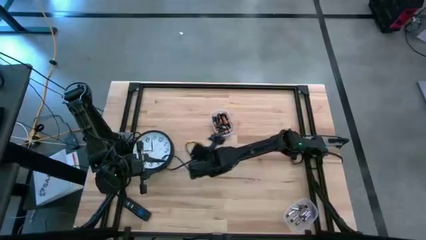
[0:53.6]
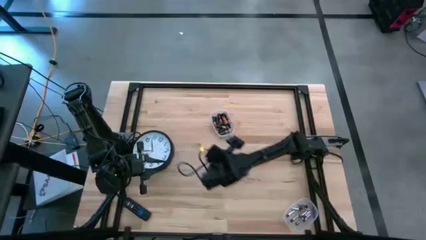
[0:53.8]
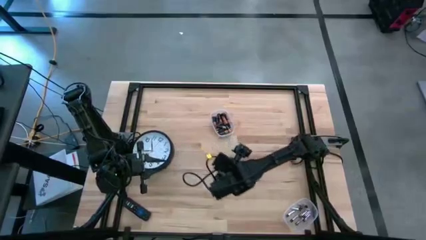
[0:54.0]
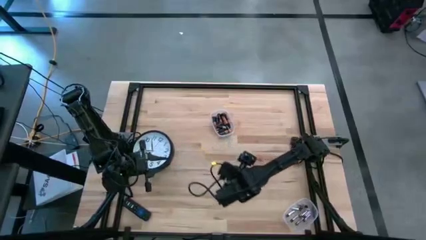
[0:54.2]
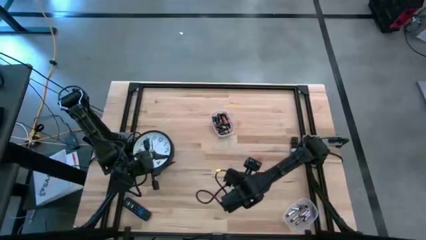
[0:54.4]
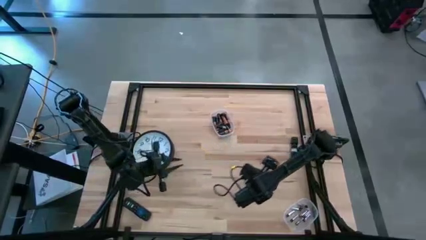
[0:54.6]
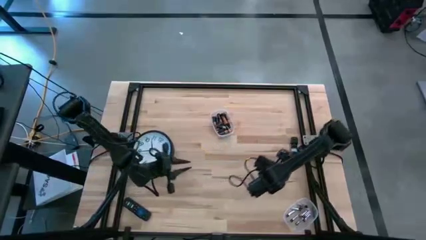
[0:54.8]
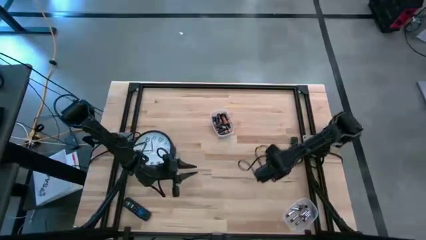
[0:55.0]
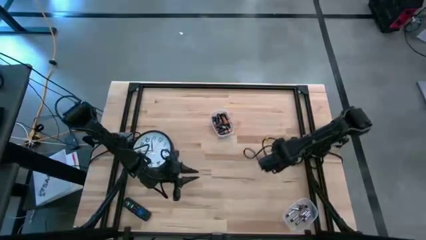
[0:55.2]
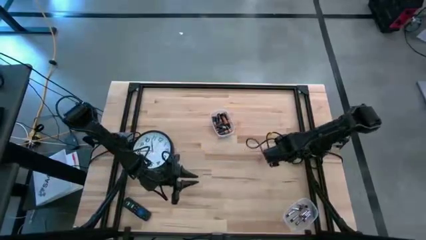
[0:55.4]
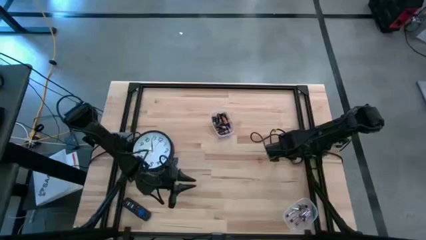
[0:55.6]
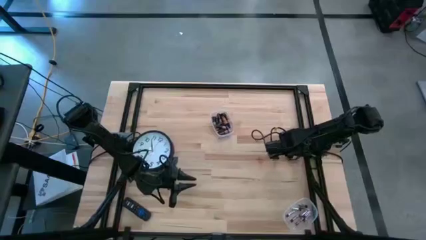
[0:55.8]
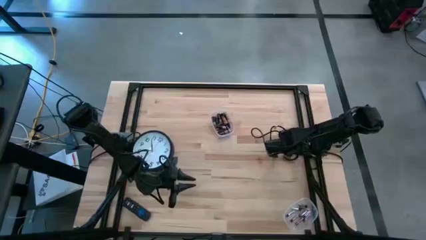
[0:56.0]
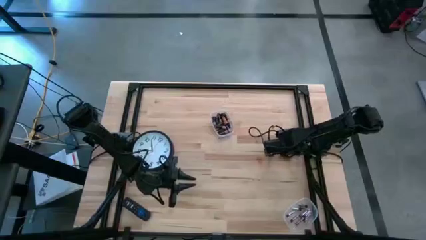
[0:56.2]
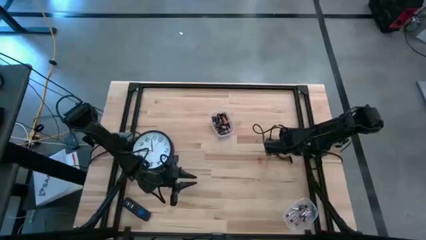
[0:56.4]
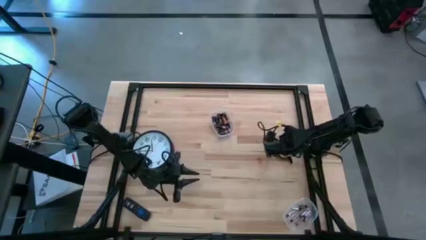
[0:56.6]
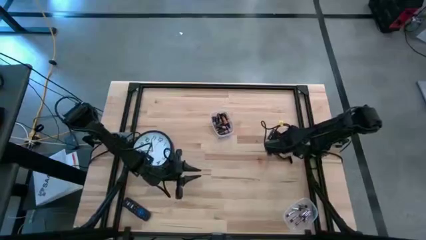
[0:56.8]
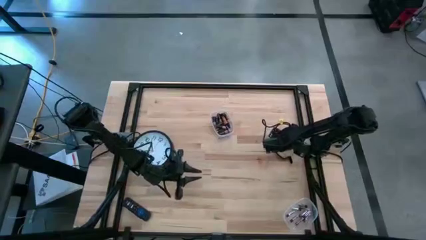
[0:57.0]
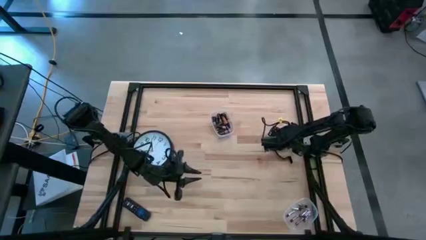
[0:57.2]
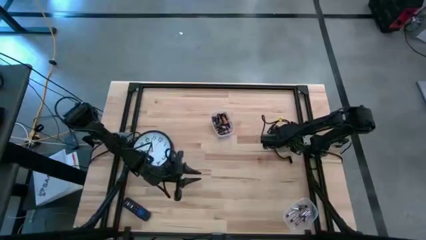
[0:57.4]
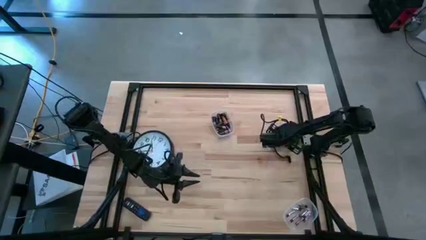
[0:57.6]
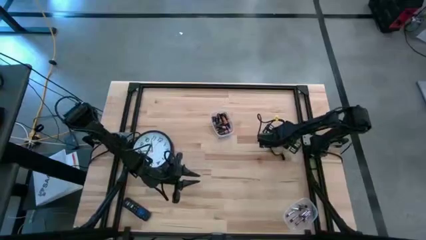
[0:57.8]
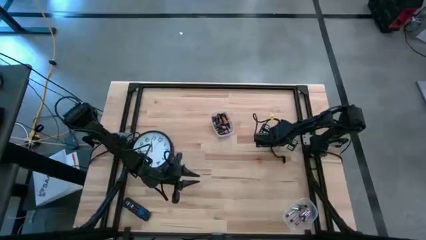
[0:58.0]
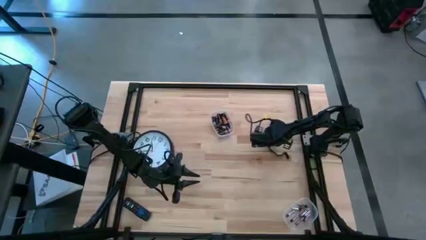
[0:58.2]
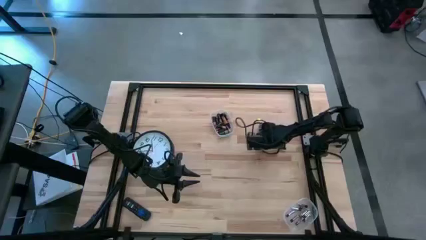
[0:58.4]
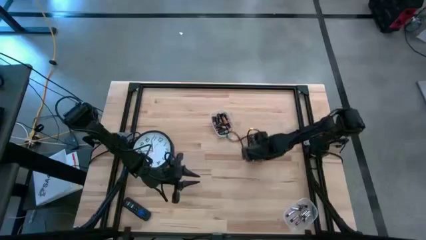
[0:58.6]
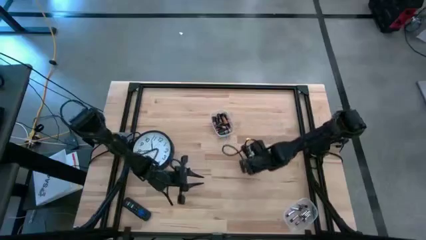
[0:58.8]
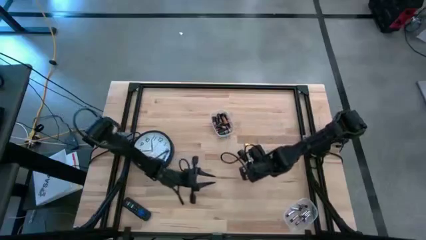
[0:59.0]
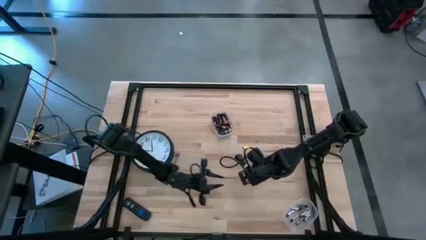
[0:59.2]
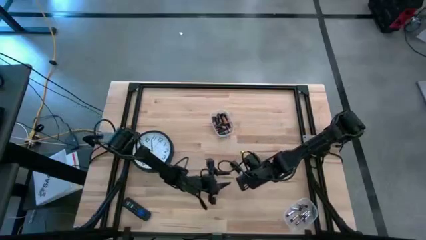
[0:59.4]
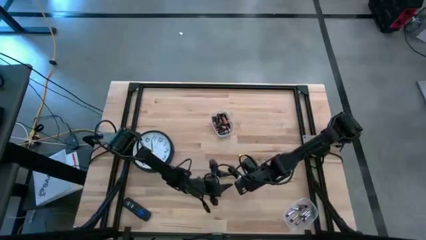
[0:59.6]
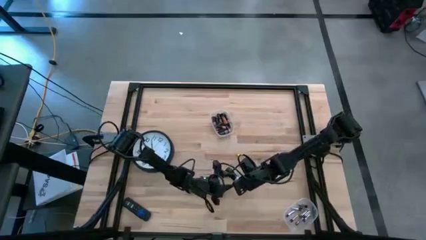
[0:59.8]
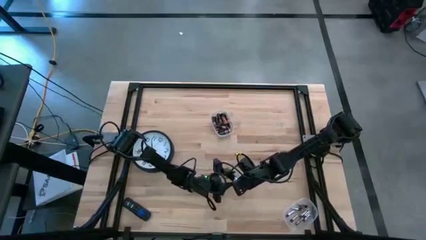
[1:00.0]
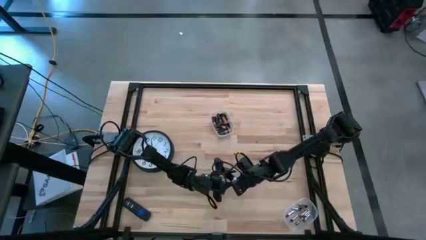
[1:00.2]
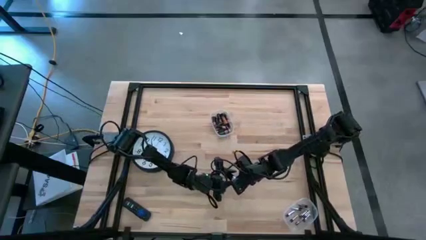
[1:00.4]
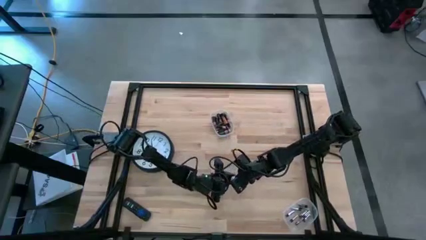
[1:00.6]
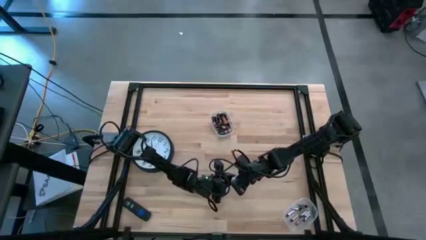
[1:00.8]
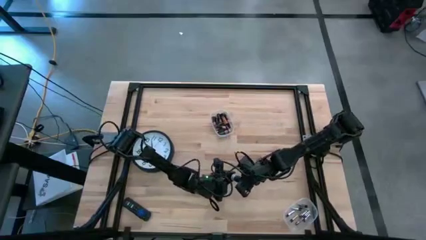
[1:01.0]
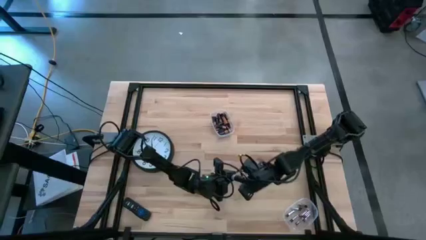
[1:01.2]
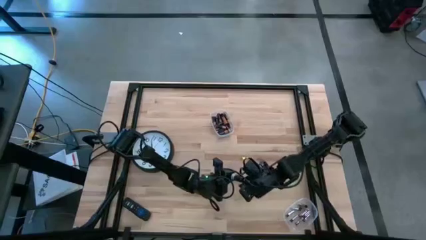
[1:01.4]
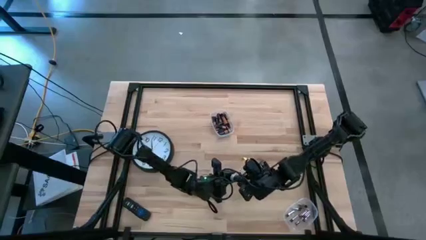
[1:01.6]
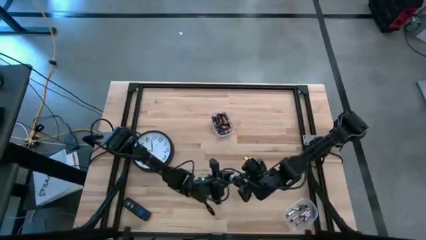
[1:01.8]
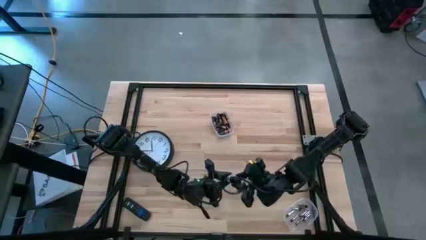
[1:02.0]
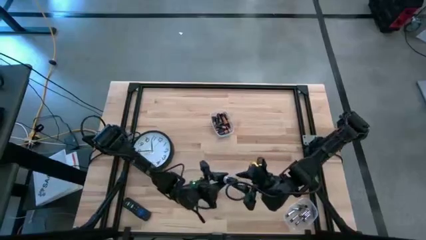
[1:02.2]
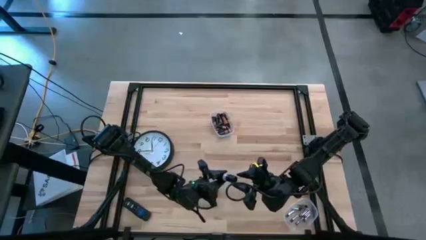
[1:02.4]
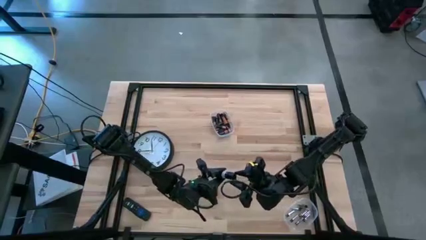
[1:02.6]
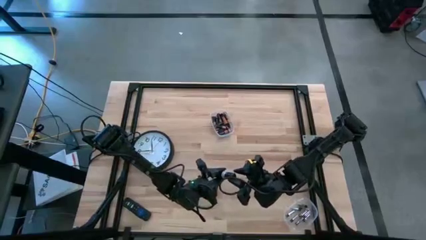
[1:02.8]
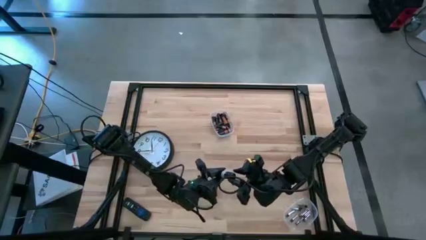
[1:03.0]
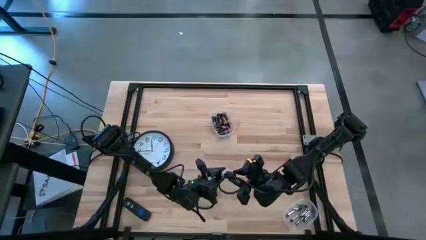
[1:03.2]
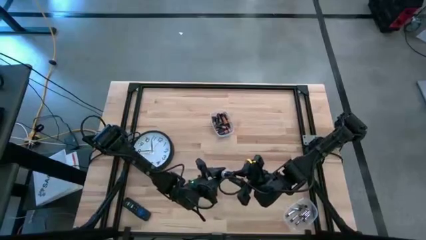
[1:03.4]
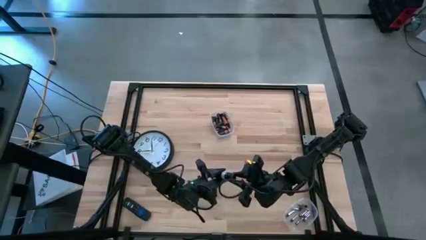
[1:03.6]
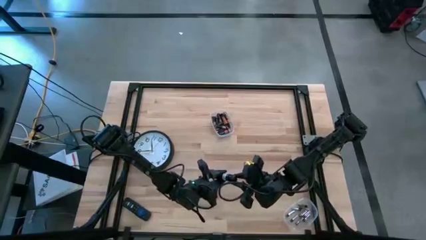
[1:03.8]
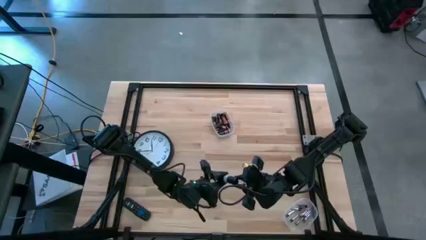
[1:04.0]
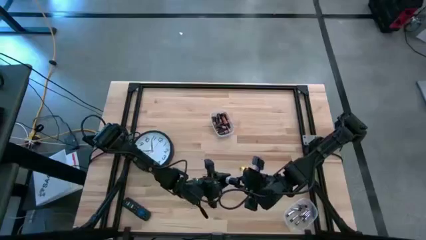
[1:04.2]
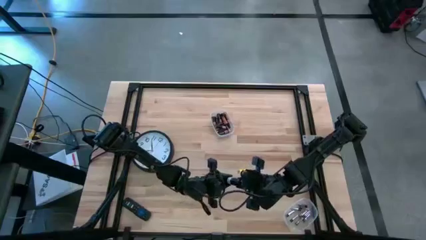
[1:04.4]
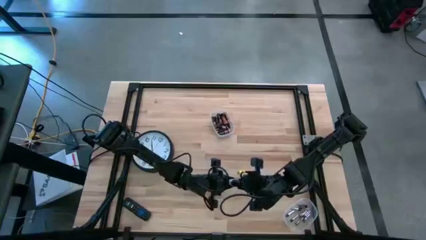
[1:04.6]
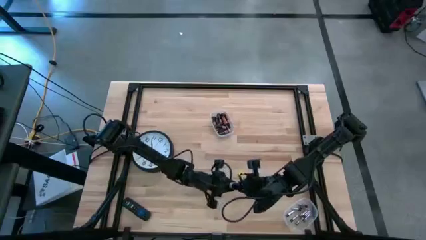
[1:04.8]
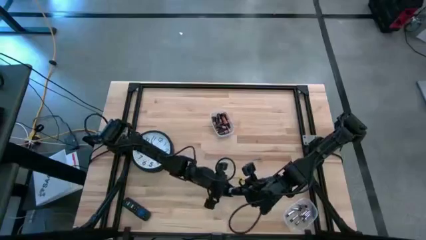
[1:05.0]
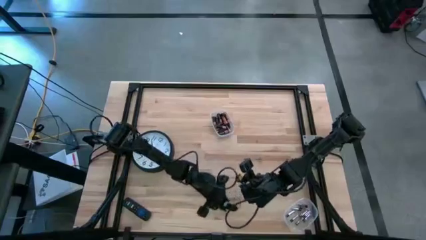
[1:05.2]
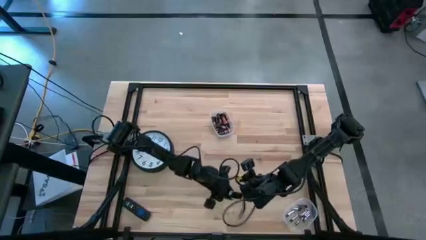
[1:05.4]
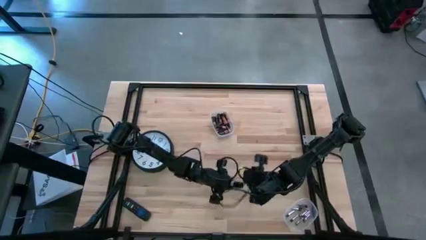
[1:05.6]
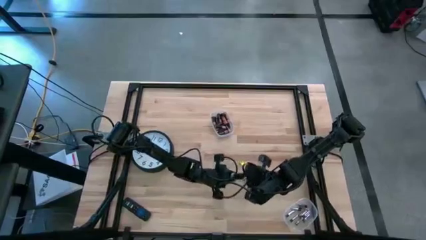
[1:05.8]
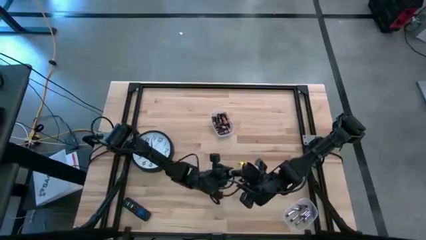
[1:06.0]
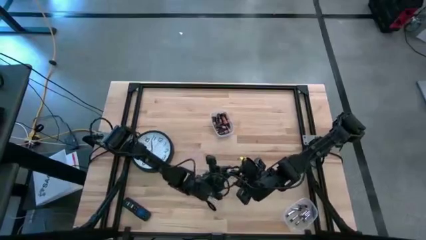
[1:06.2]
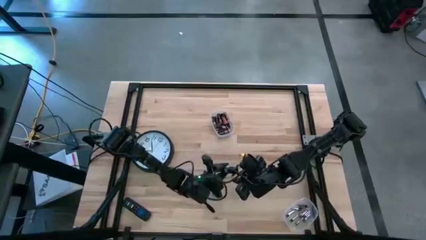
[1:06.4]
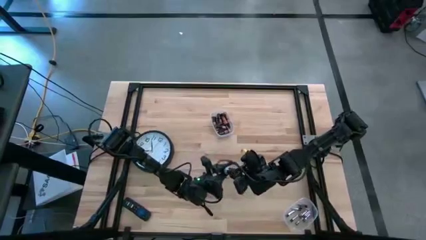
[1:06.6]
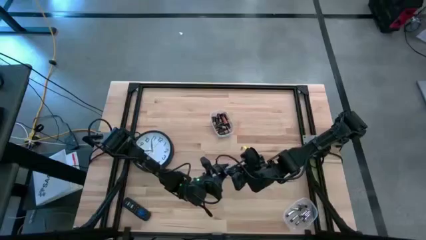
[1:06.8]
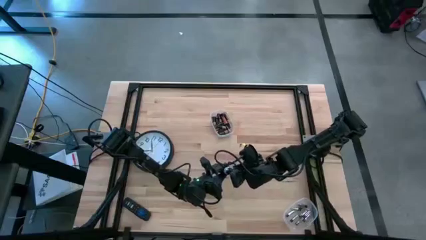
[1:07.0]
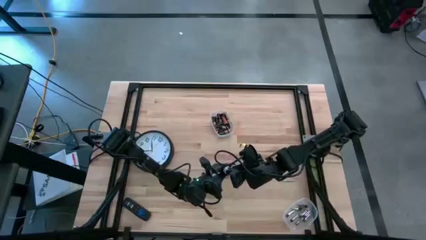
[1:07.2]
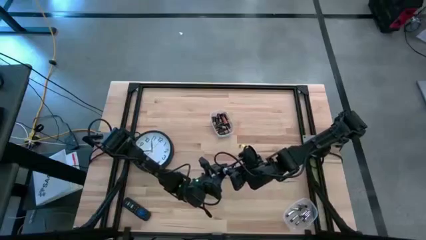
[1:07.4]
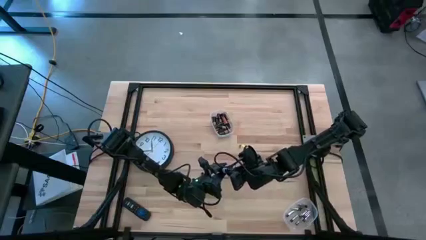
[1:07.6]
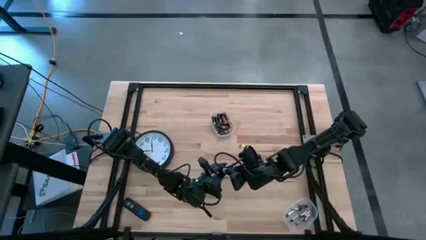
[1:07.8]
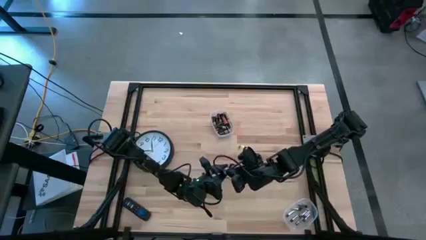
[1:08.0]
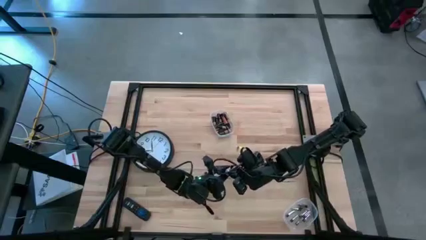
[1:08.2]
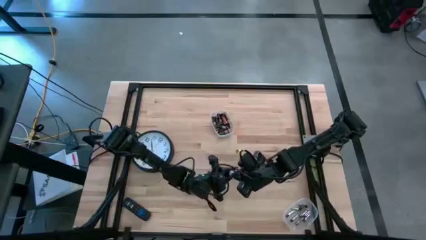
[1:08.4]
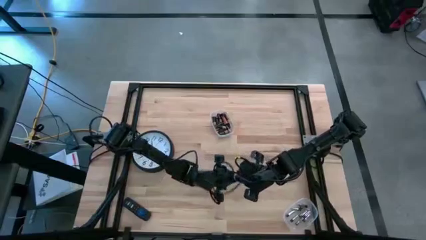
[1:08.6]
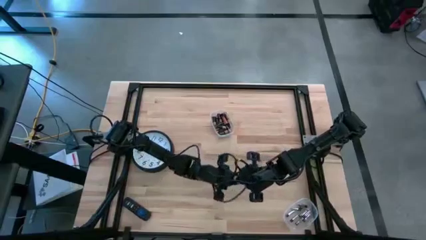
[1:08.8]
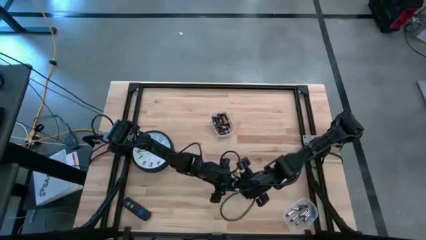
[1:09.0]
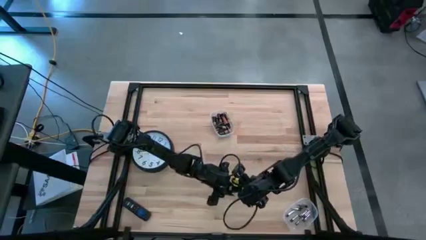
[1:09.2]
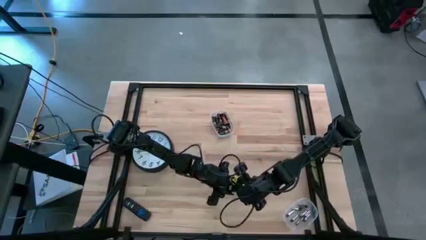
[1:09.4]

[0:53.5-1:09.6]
Task: Insert battery
Open the lid of the black flashlight

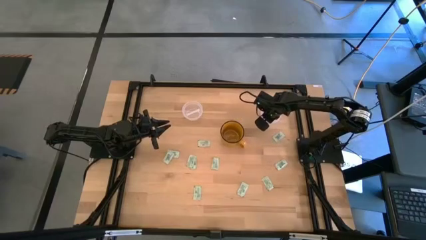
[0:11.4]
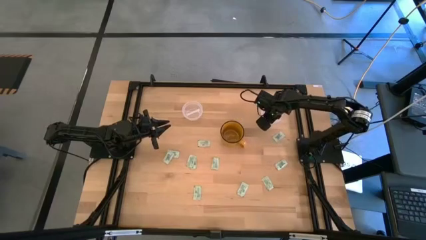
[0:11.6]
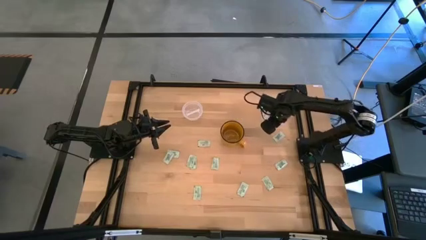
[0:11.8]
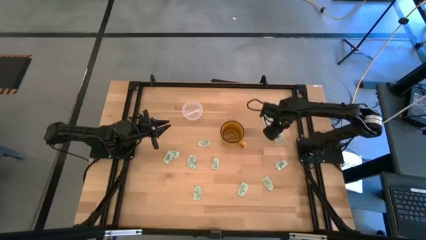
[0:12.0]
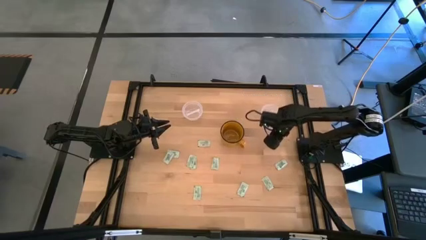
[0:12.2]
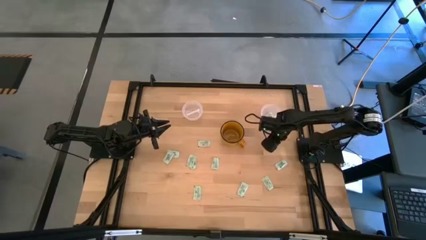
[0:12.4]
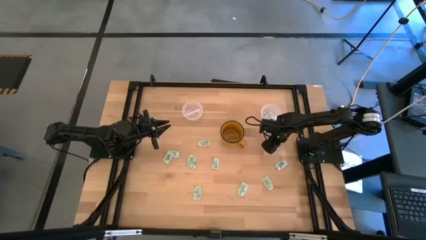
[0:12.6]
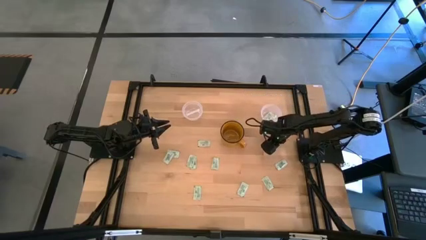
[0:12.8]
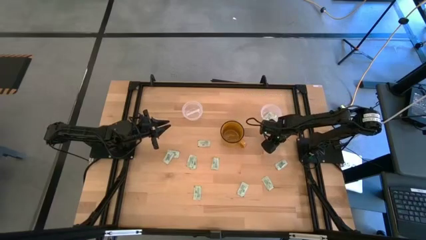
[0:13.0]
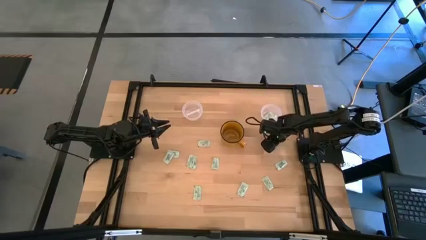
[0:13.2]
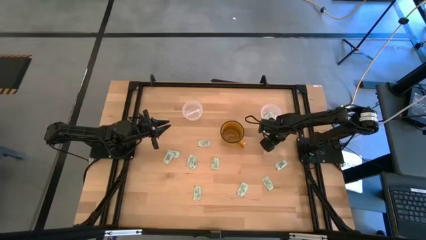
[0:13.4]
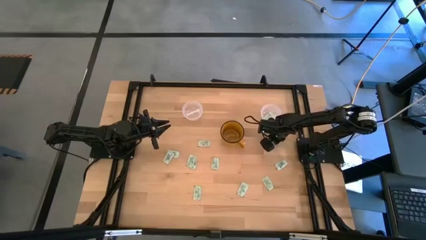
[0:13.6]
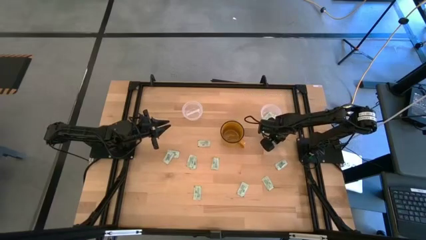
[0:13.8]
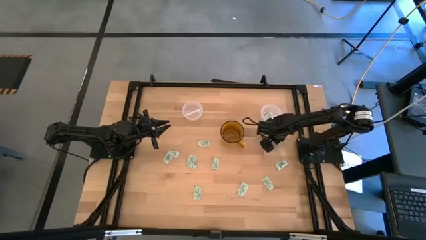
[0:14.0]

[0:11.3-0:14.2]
Task: Pick and place Stevia / Truvia into bins
Put the white stevia packet into the right transparent container
